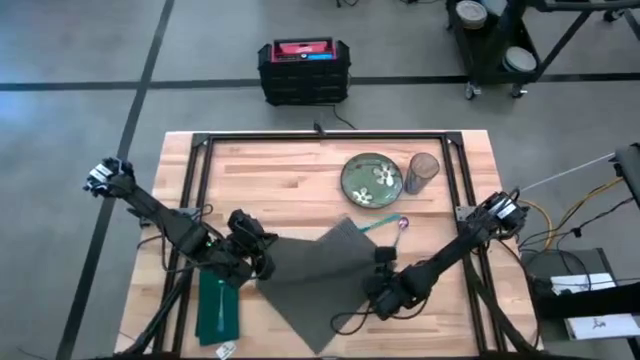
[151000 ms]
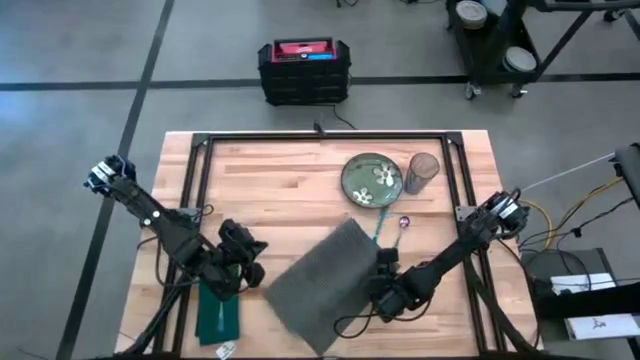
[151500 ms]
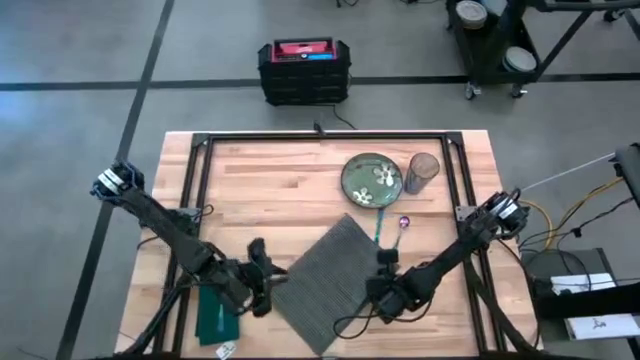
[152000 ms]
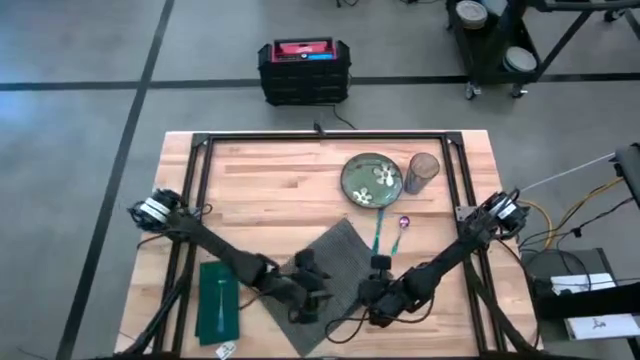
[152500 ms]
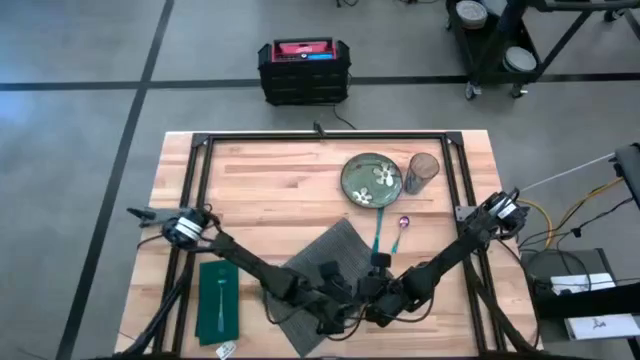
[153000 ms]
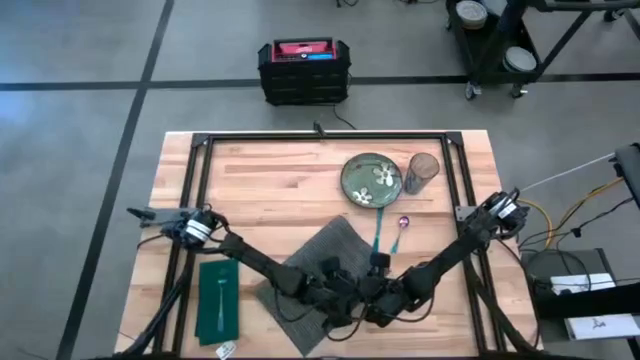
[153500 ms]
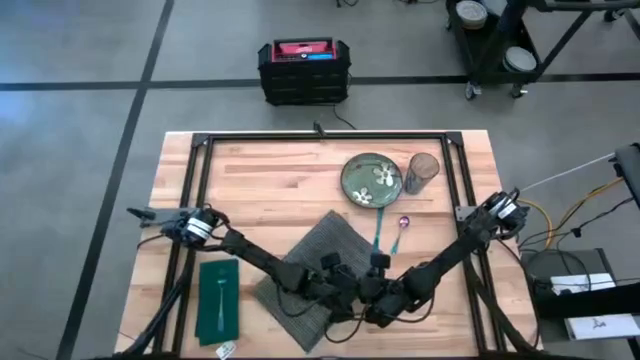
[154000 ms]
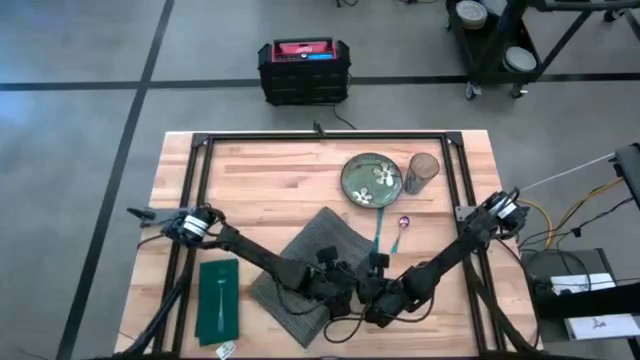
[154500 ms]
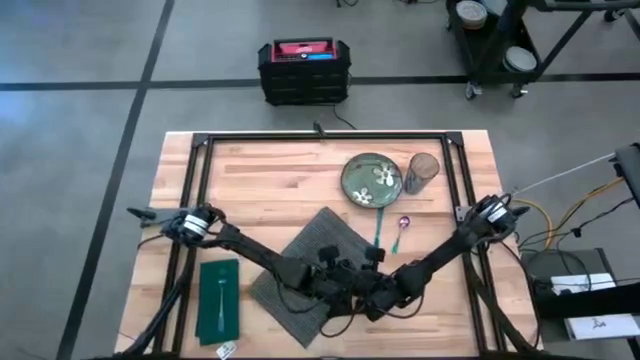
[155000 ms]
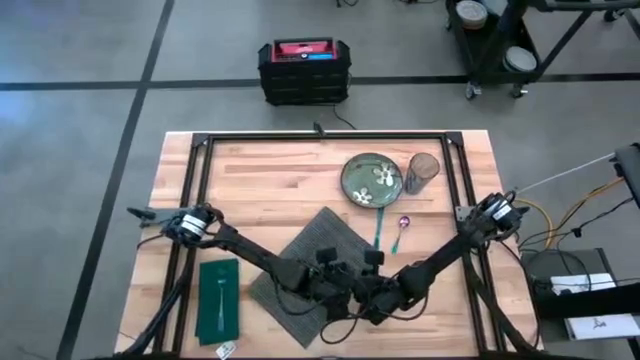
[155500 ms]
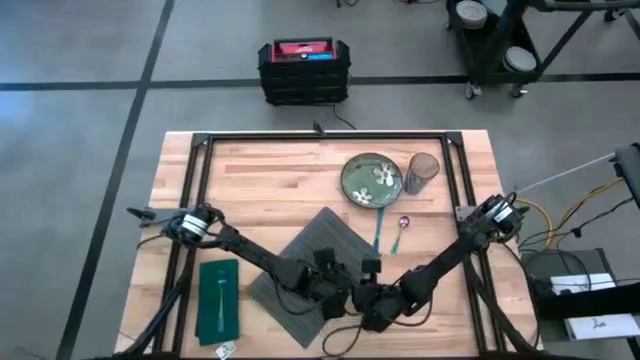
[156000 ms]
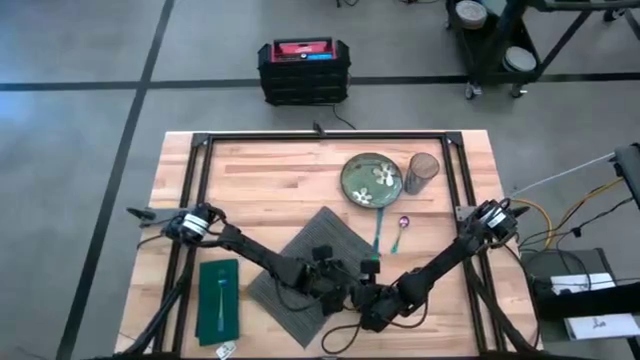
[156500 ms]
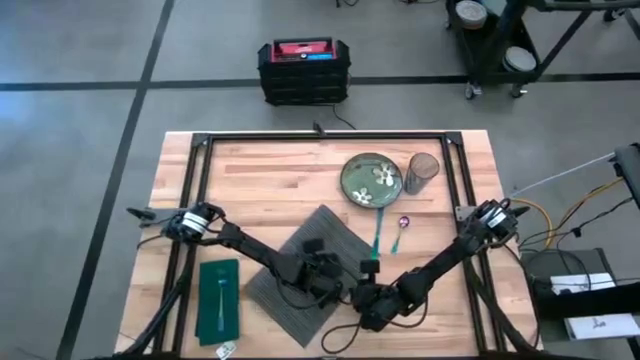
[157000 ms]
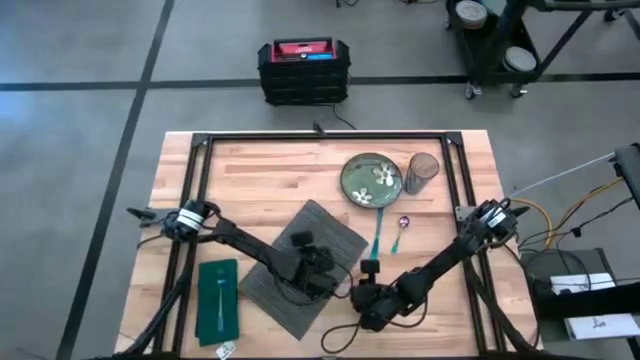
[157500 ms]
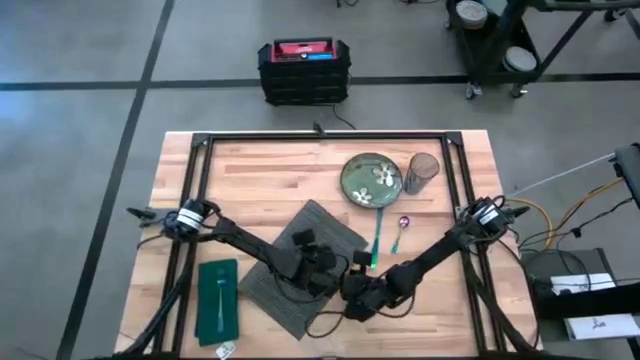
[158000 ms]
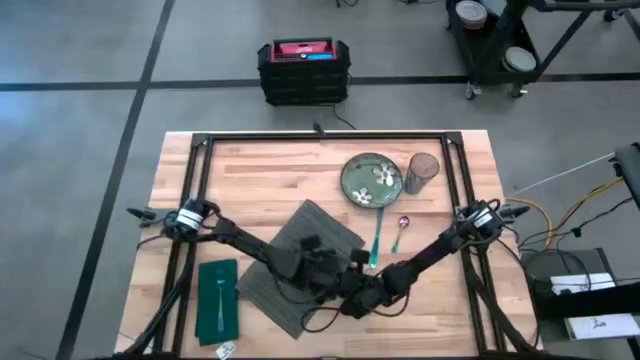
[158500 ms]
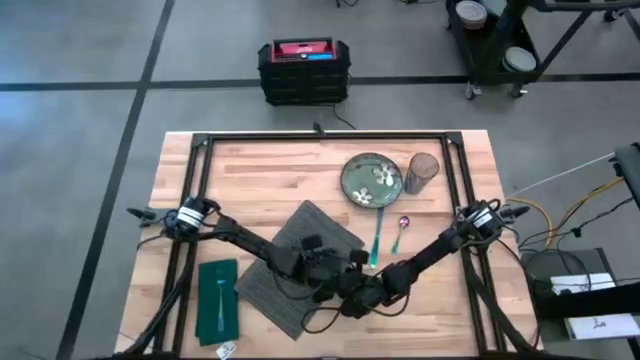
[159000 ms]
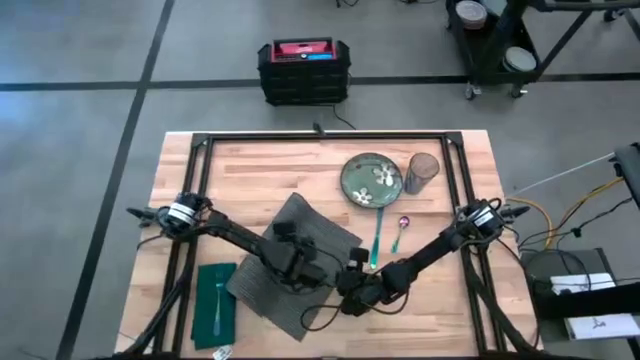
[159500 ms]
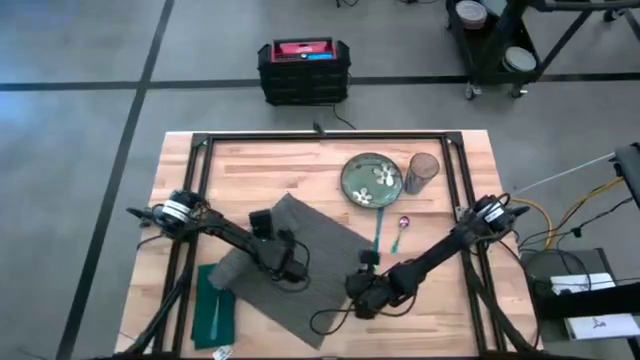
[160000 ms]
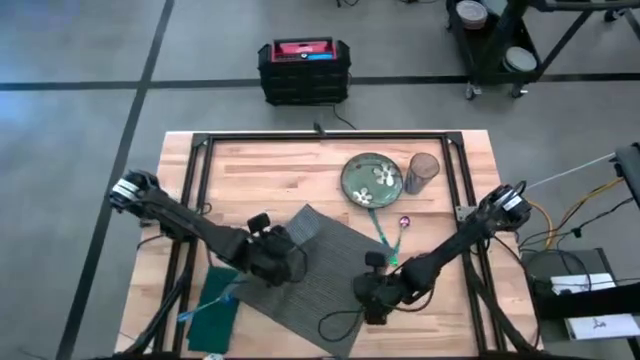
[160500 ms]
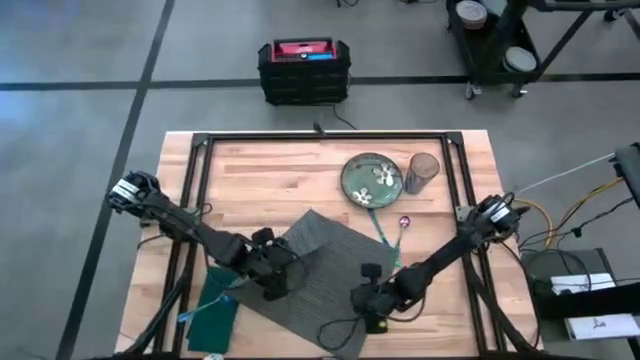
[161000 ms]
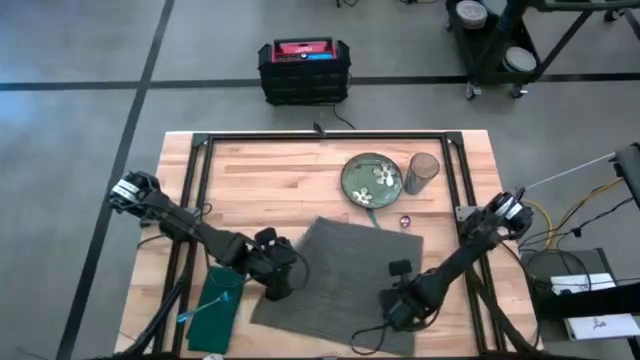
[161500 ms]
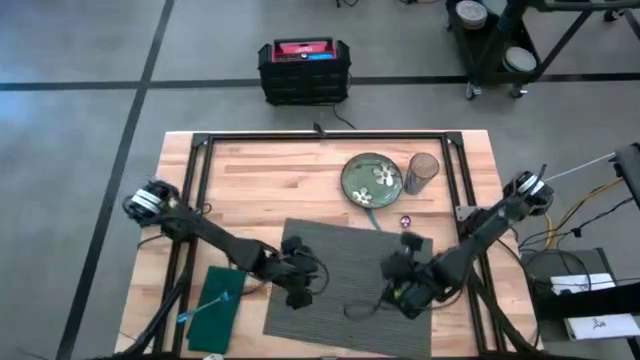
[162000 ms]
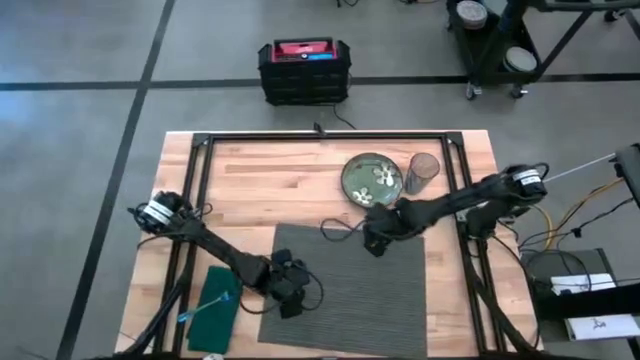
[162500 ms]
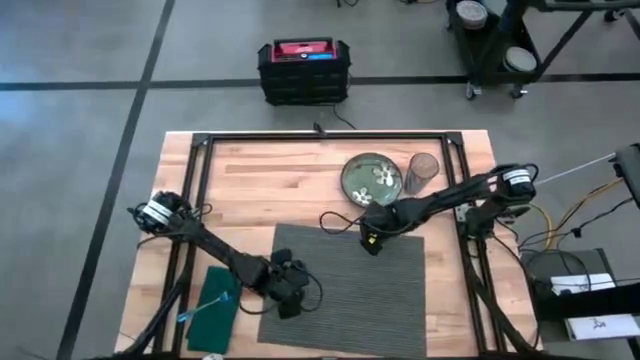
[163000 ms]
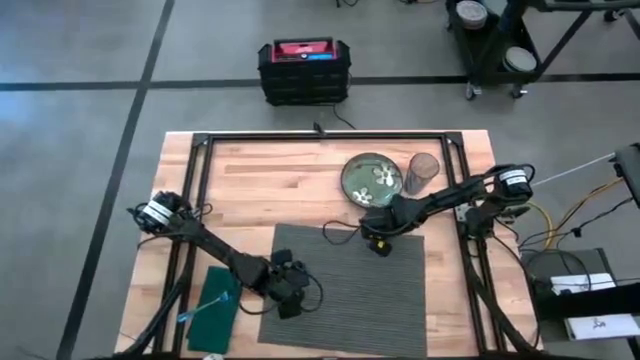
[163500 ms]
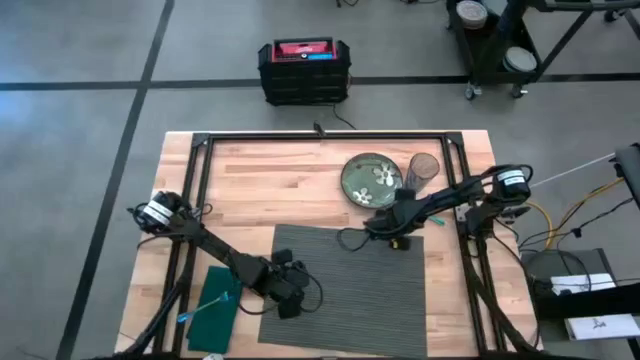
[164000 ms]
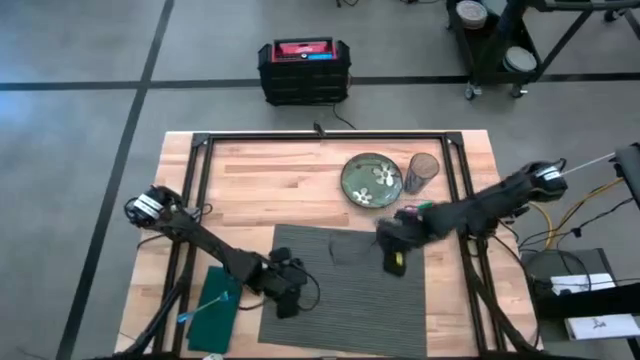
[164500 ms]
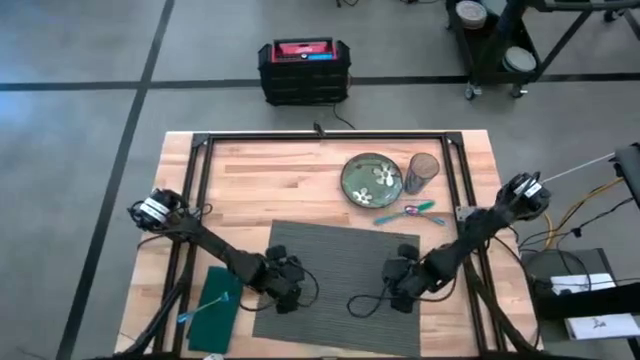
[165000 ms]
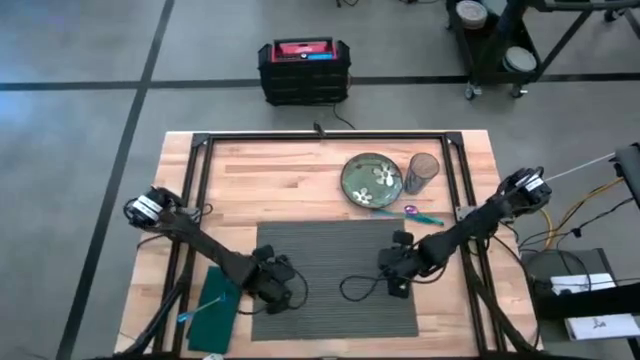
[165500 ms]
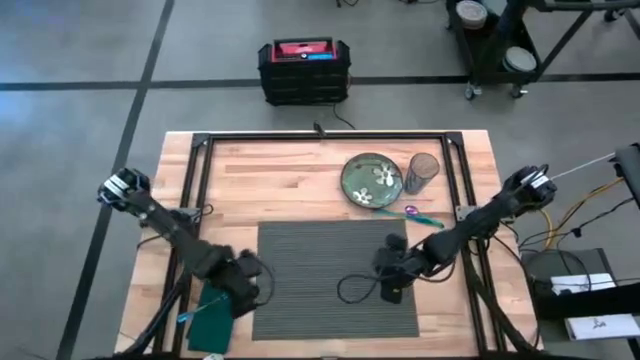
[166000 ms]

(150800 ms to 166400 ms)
Task: Set table place
Move the gray place mat to the center of the table

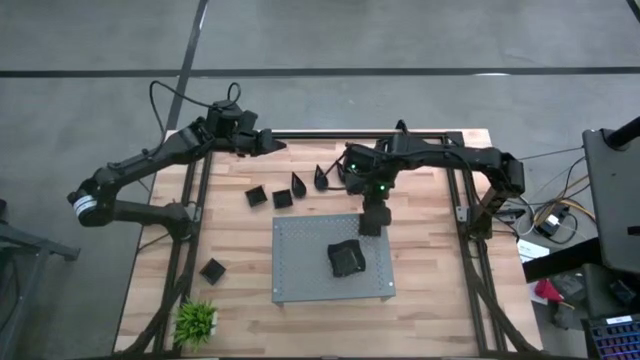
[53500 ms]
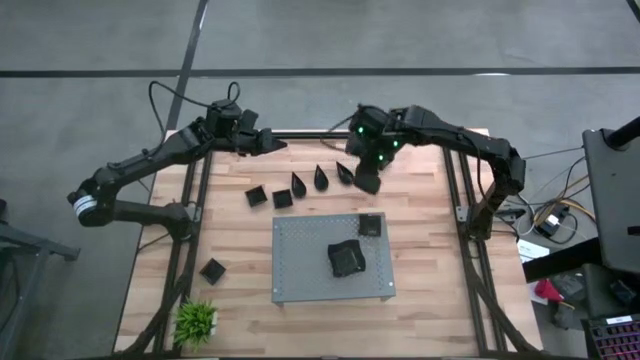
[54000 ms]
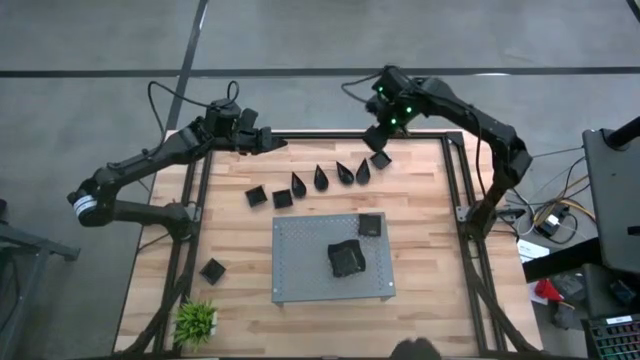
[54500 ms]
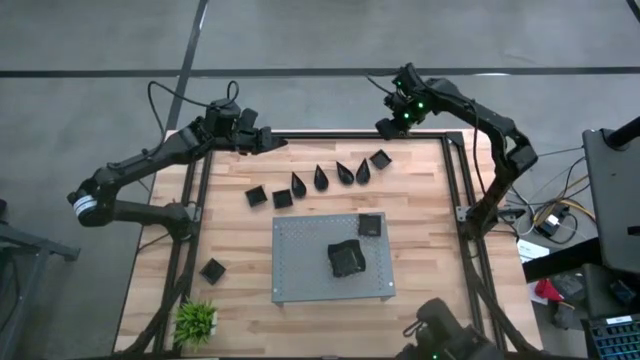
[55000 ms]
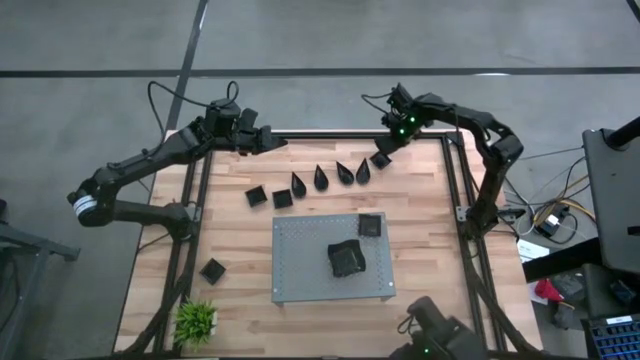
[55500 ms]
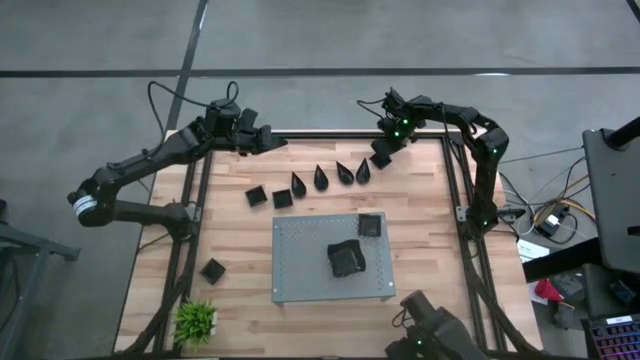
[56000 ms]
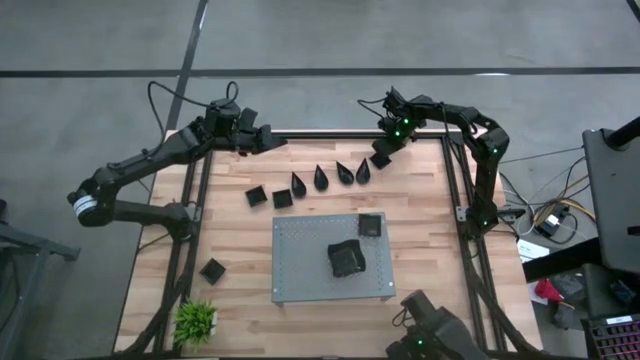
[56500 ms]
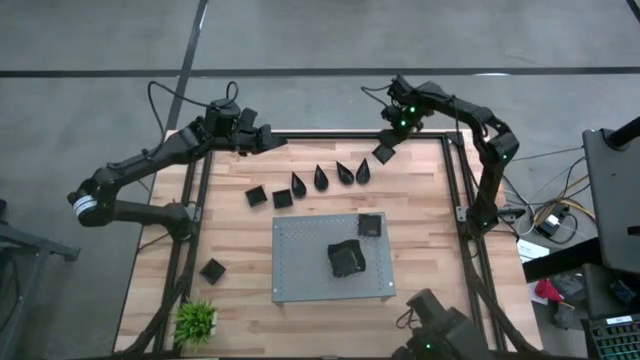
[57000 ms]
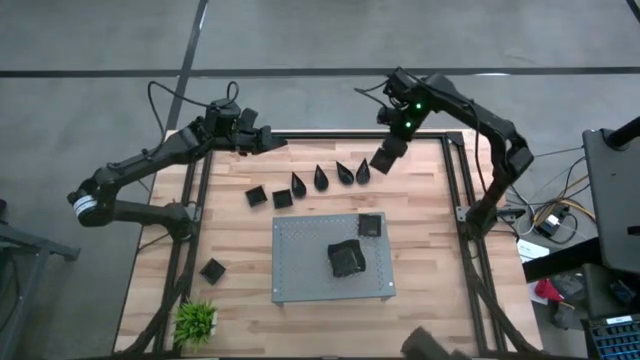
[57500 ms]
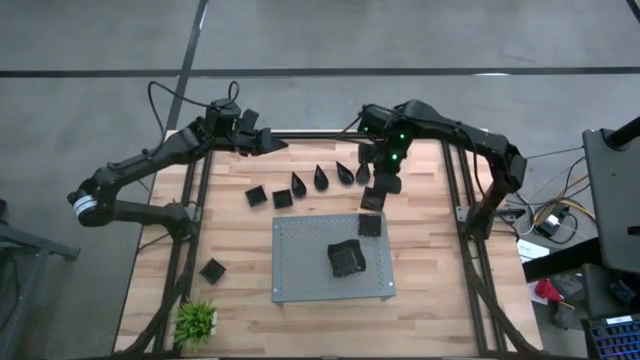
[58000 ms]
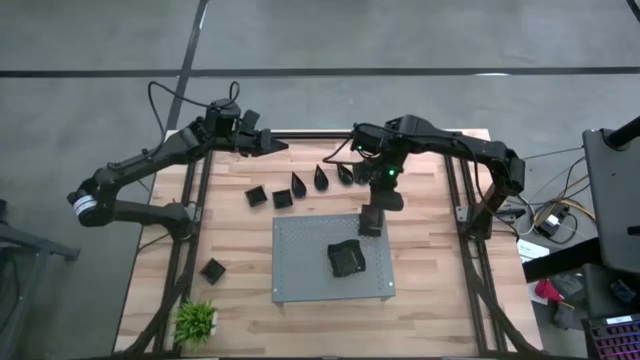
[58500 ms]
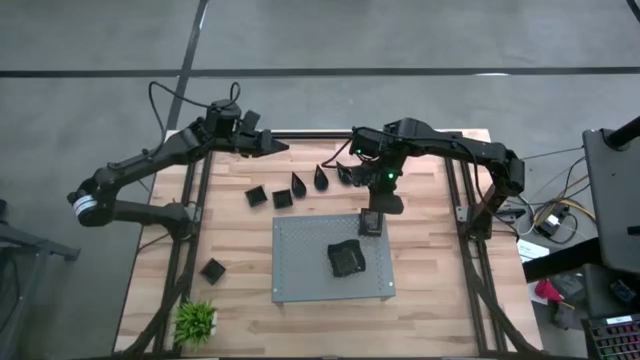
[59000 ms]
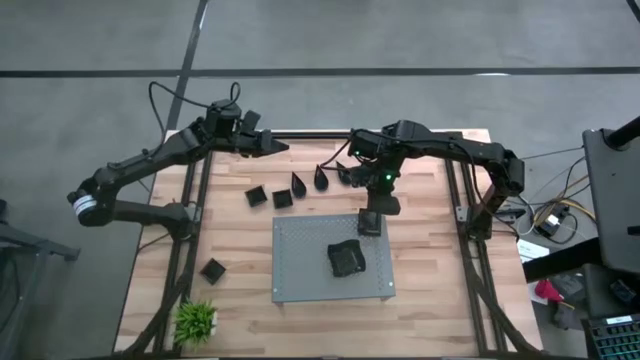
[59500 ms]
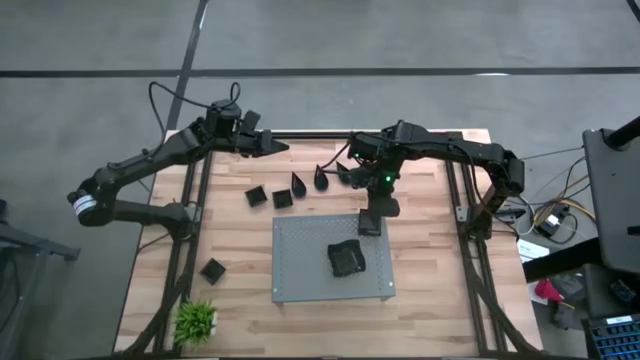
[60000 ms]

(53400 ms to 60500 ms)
Task: Pick & Place Mini shaped plates
Stack the square plate on top of the other square plate on the shelf
